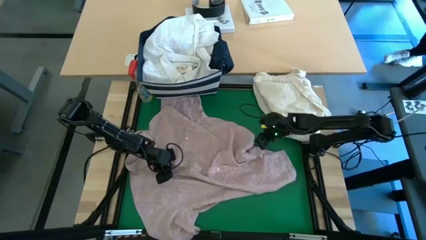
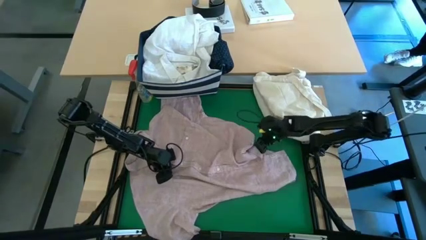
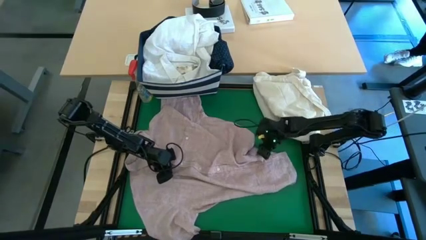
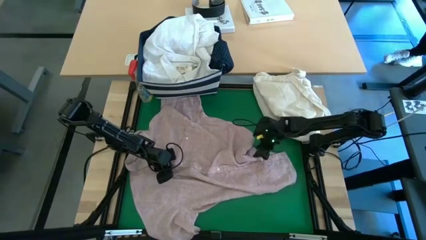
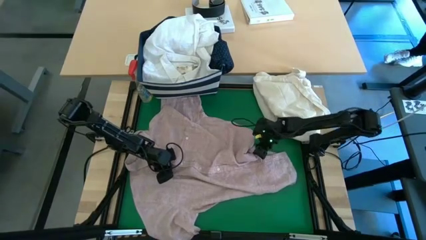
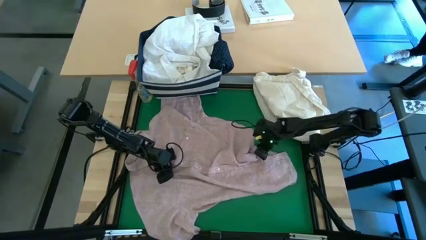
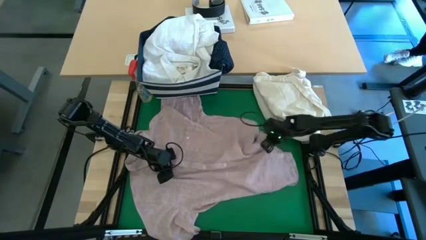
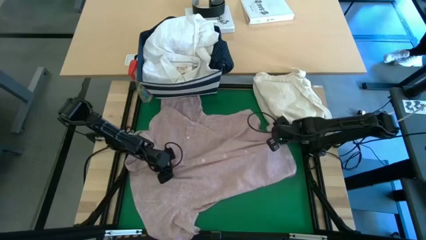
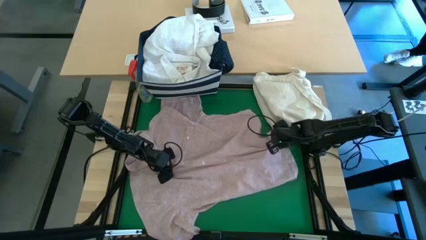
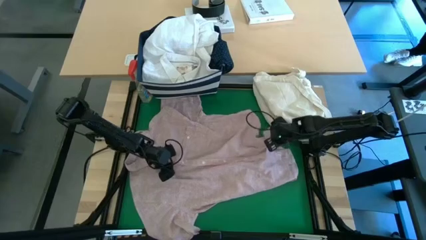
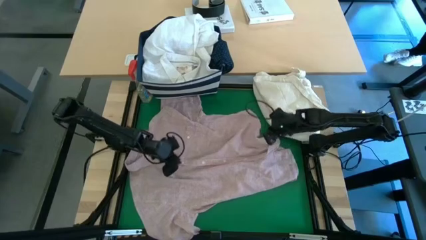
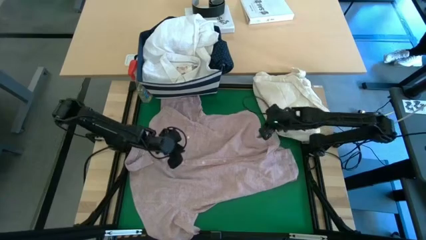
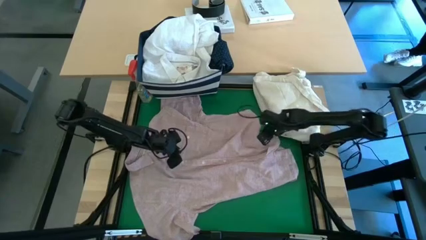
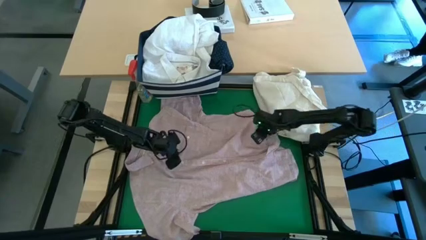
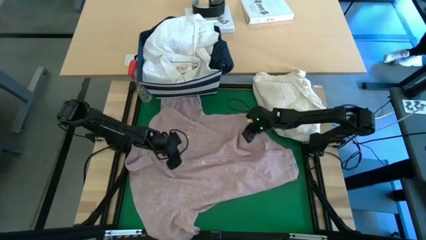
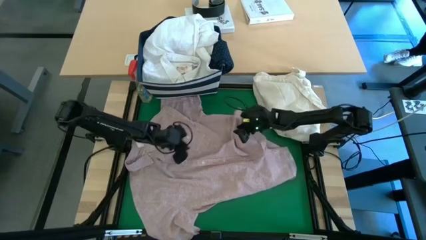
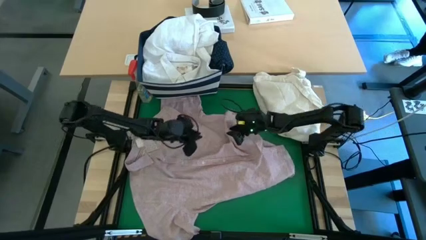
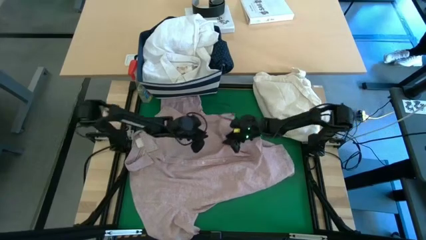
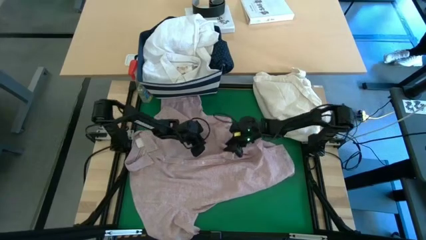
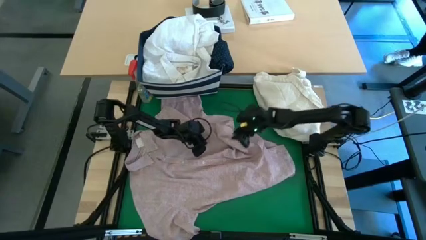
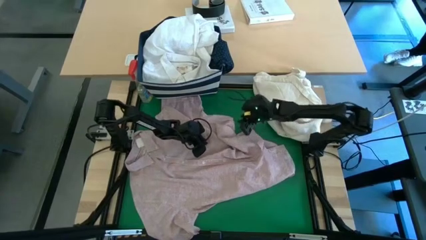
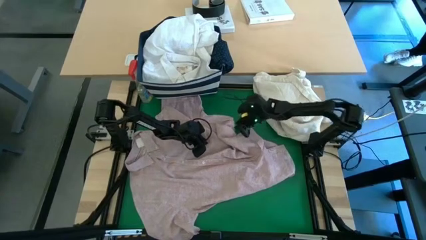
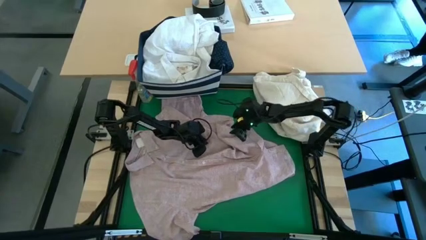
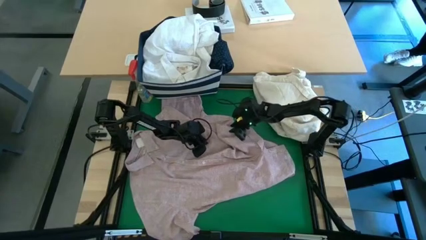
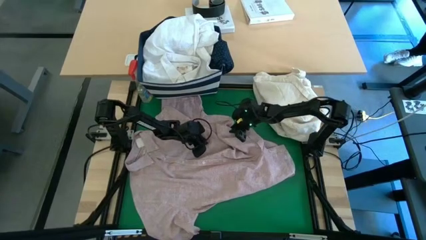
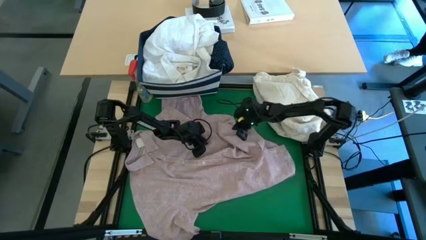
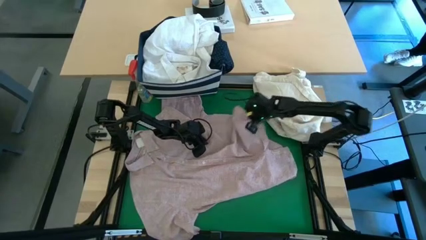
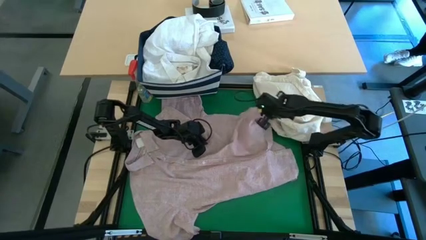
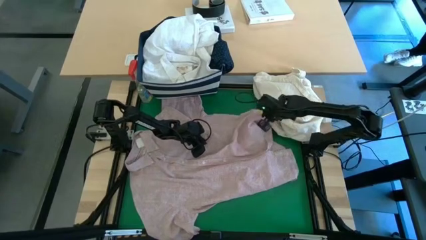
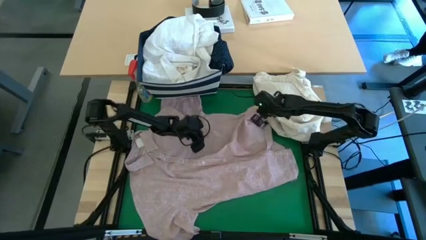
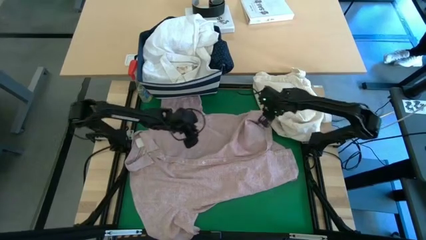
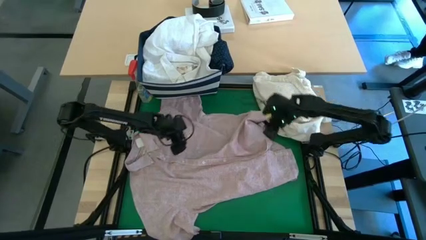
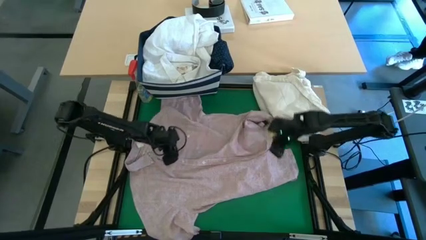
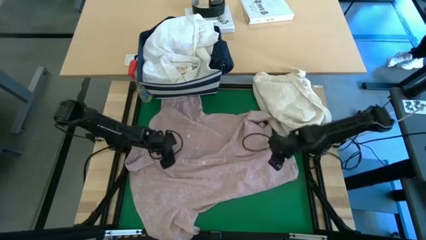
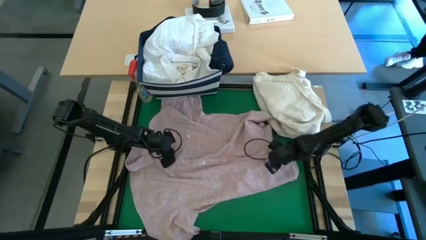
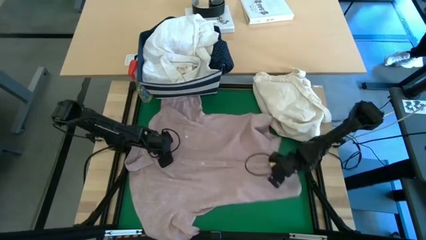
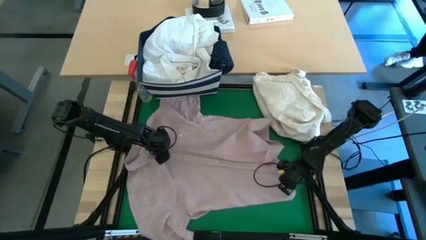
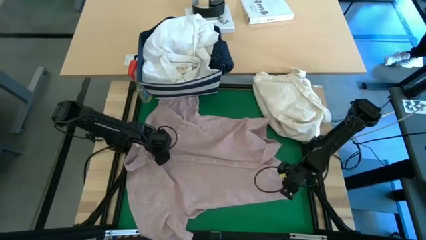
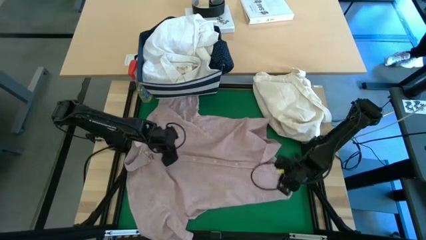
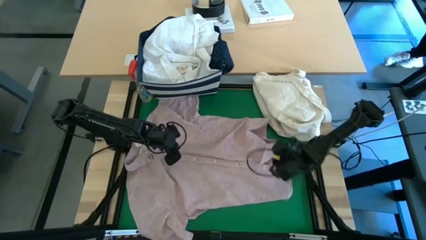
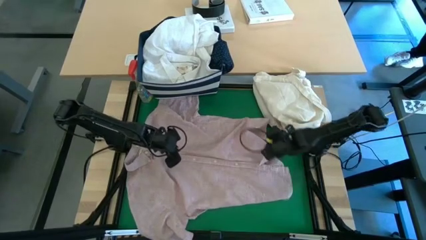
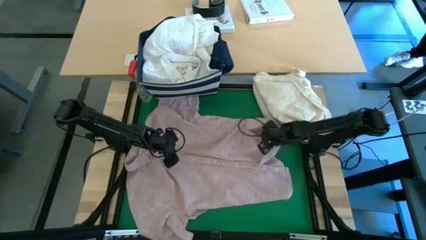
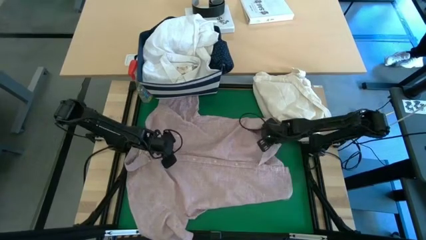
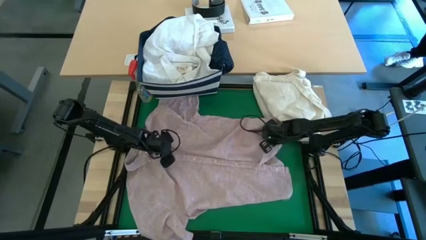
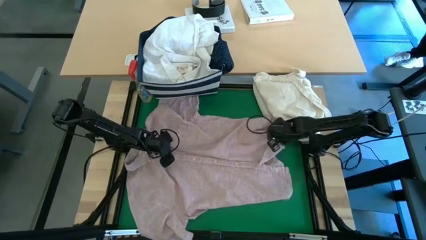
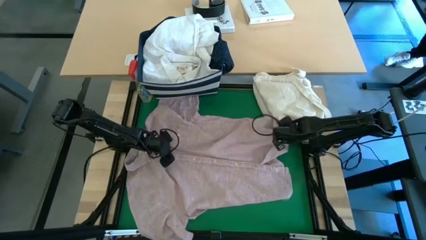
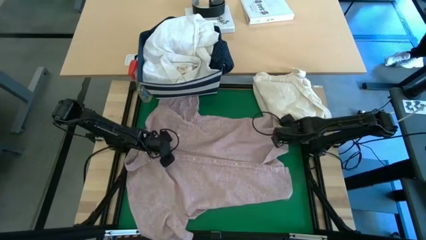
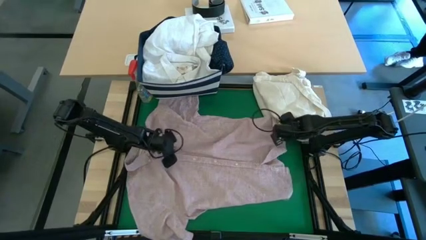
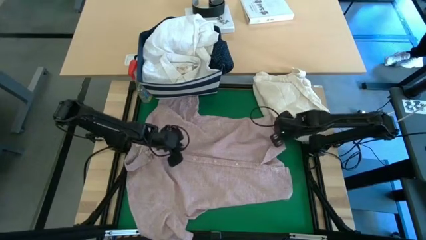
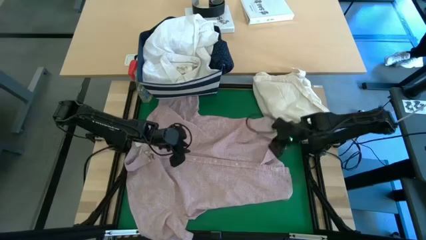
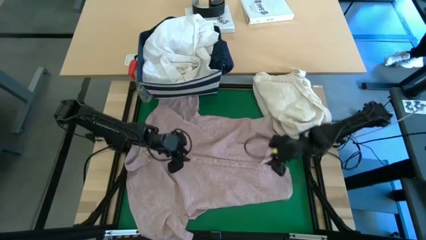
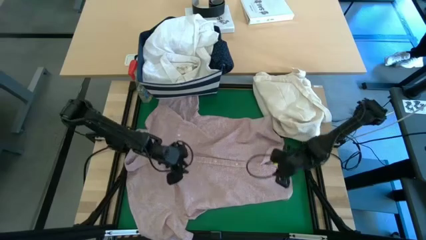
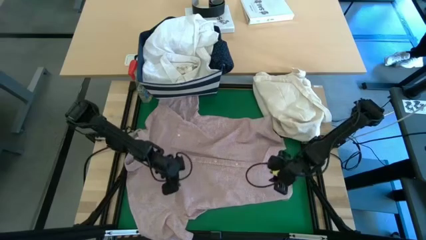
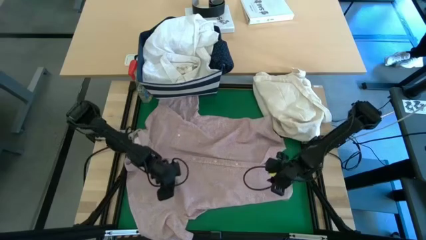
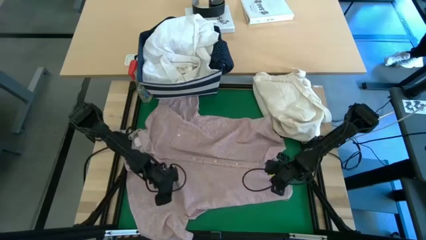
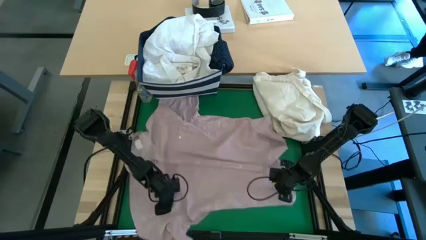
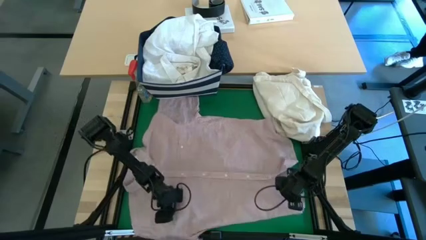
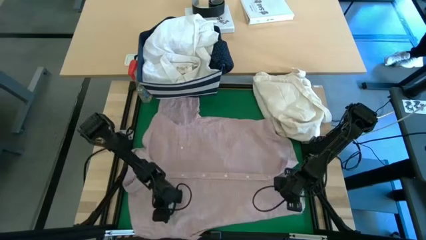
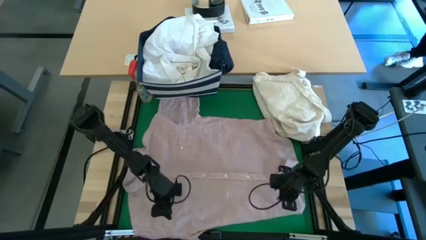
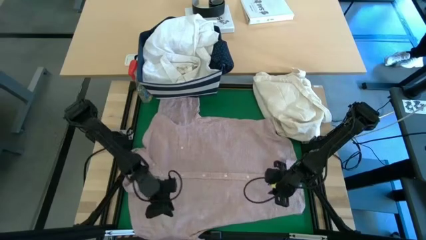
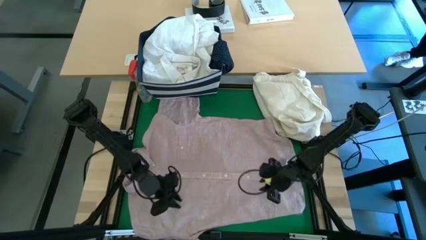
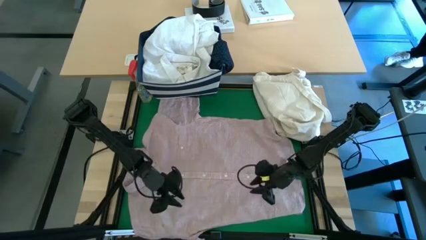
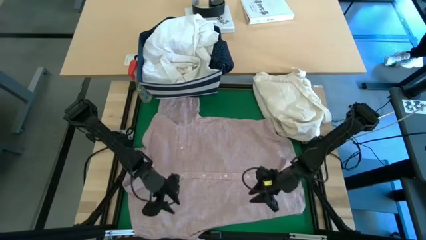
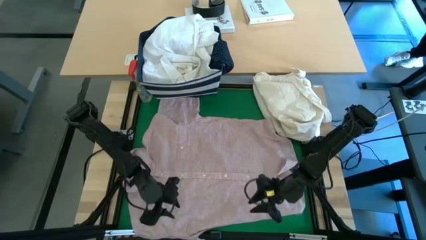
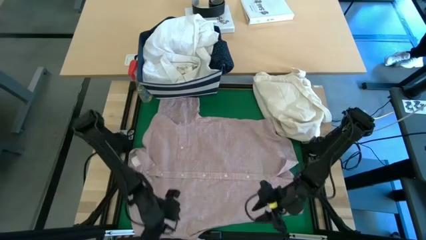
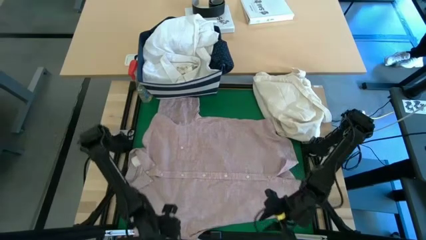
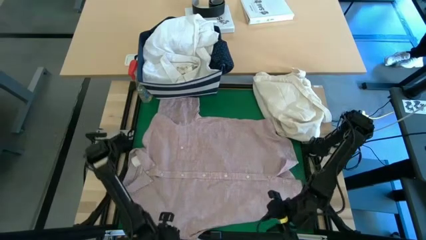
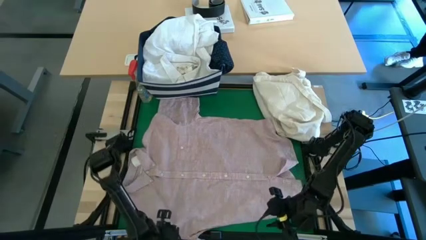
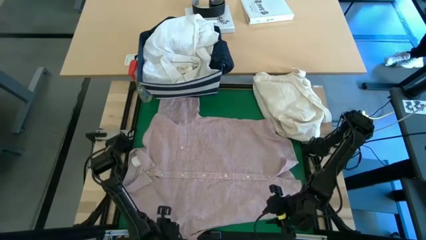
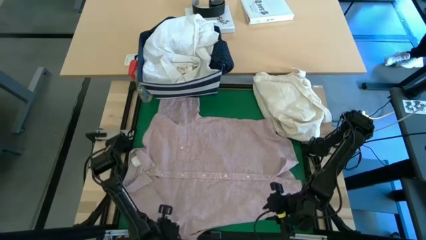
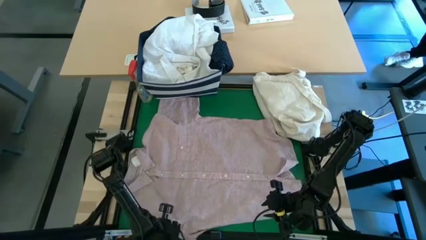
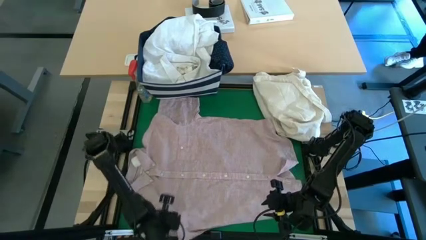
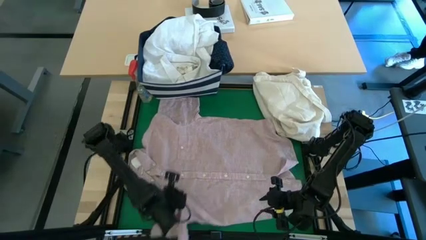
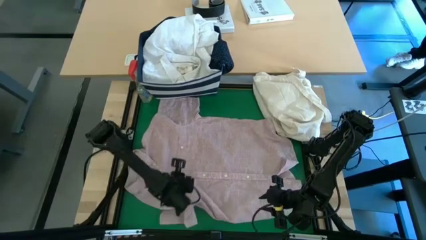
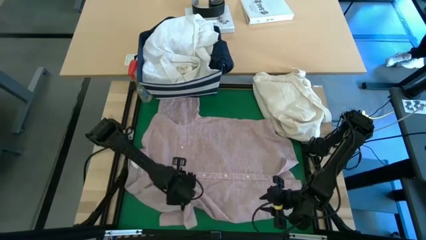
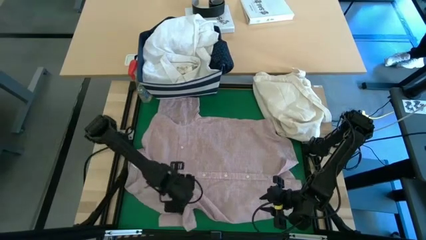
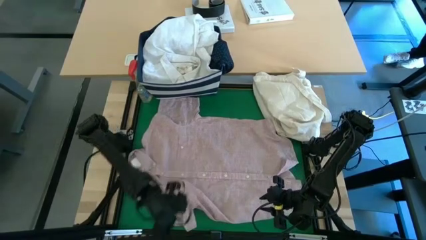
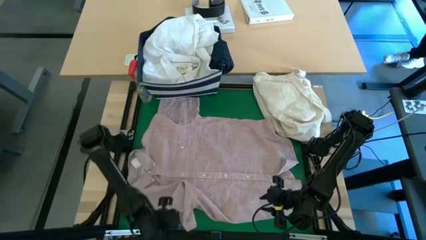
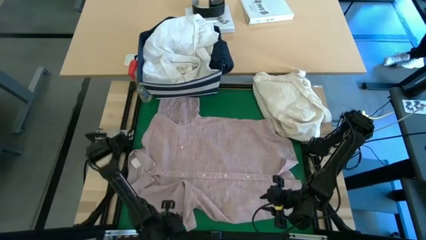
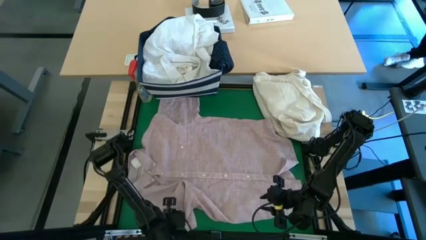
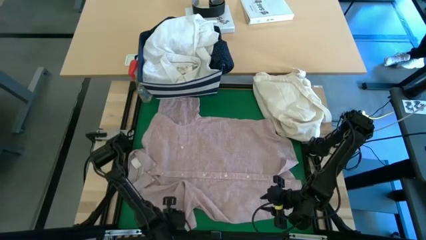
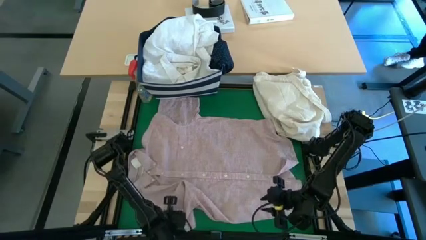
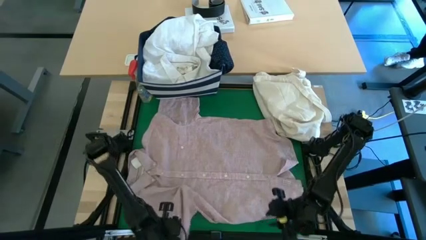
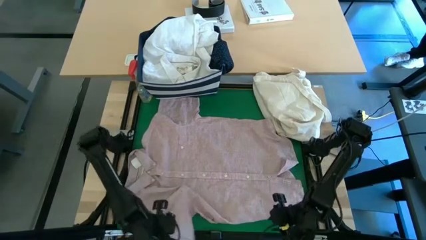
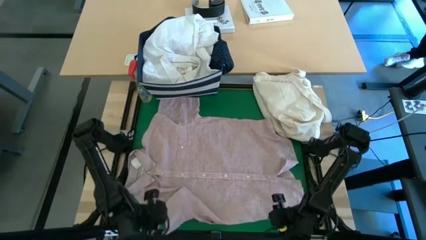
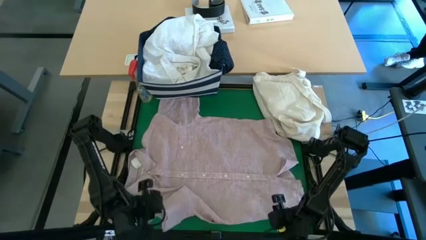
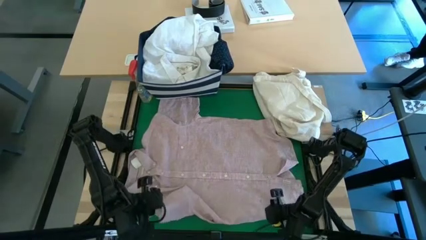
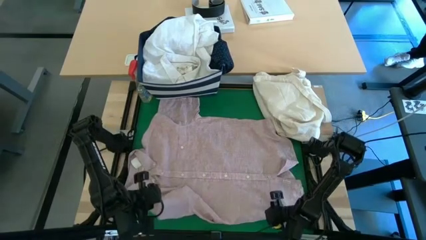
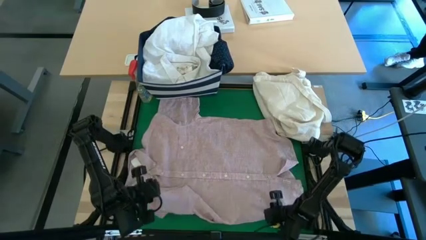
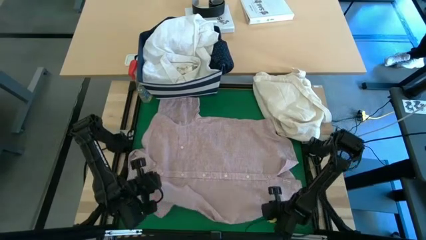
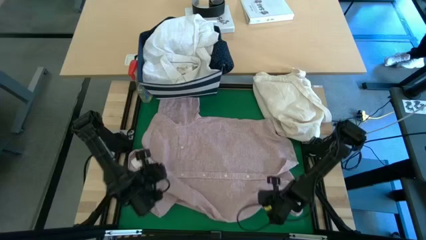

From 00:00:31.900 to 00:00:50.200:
Task: Fold laundry
Fold the red polo
